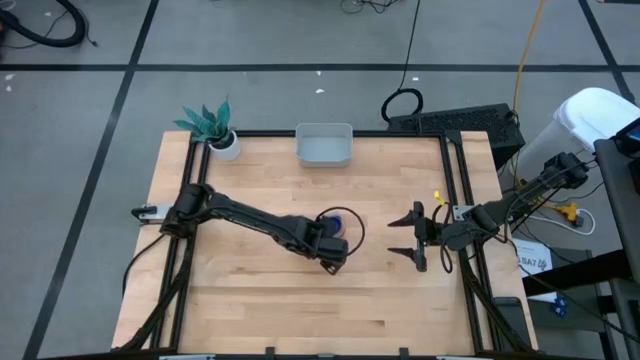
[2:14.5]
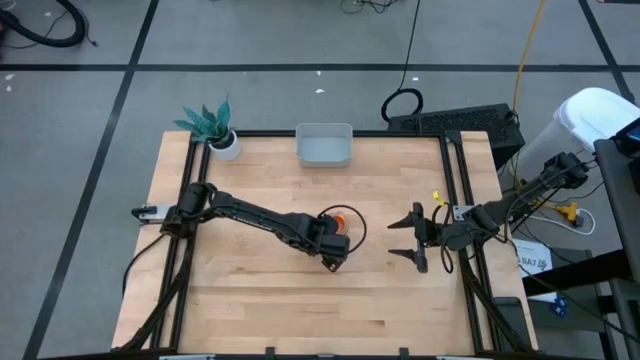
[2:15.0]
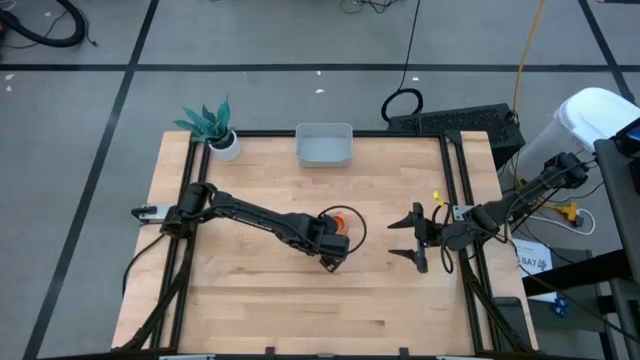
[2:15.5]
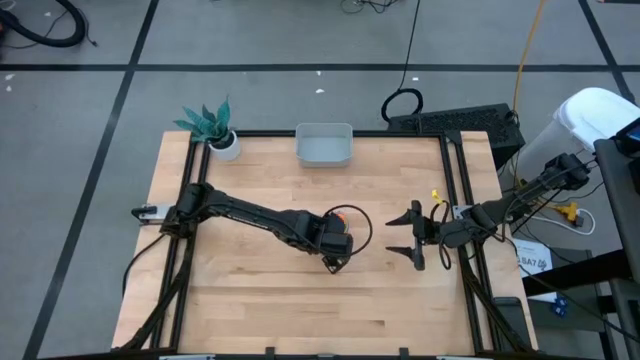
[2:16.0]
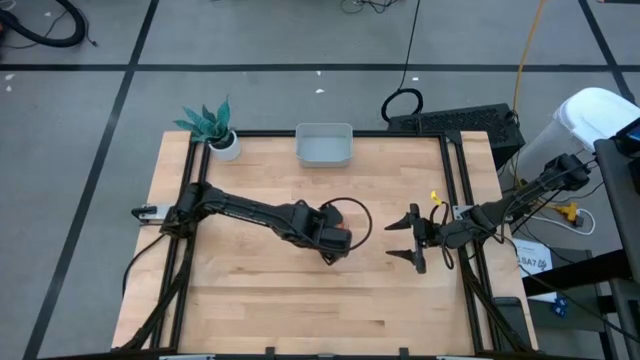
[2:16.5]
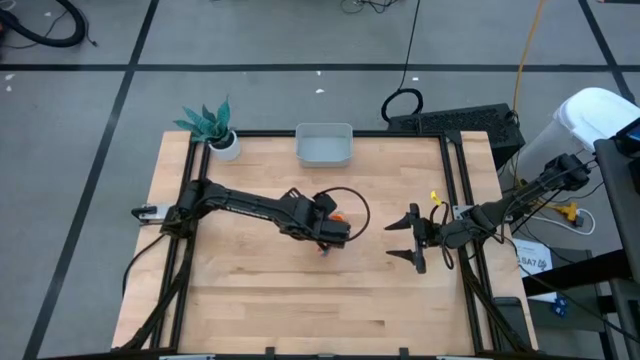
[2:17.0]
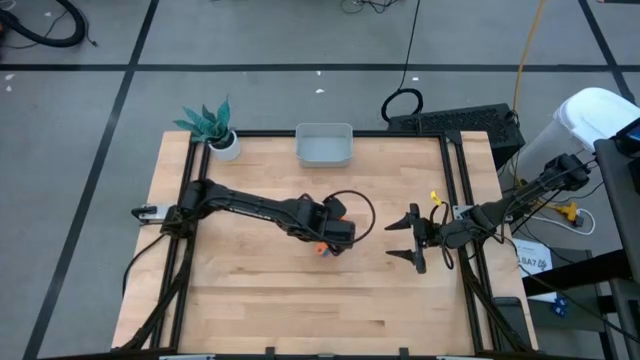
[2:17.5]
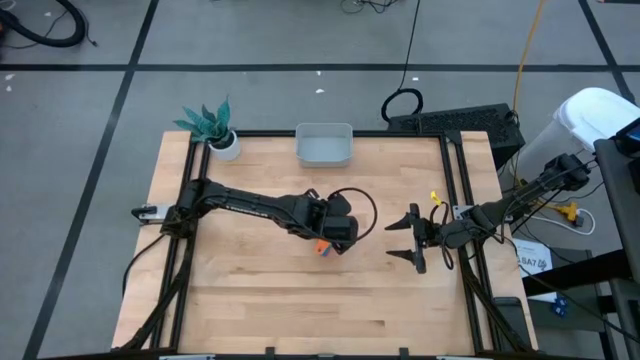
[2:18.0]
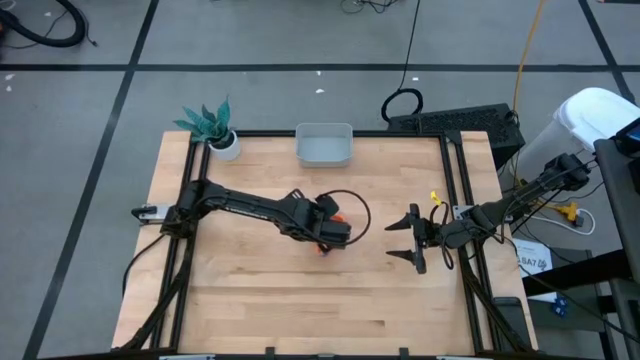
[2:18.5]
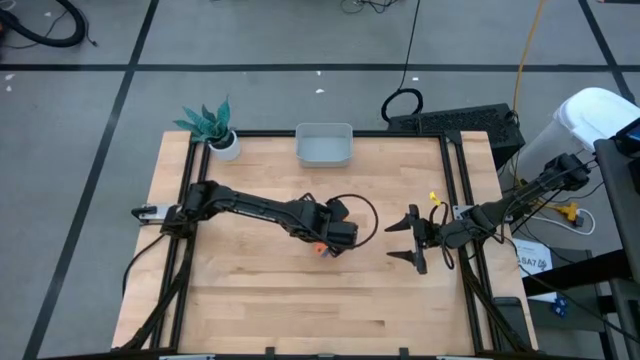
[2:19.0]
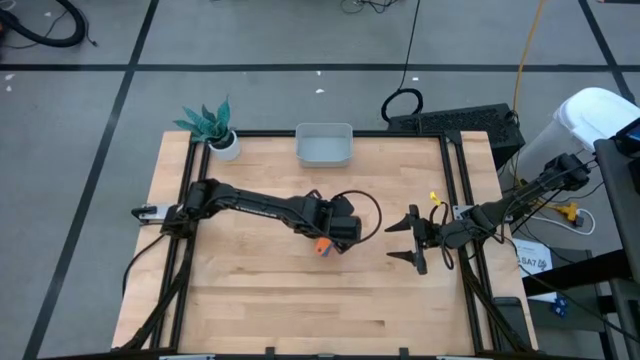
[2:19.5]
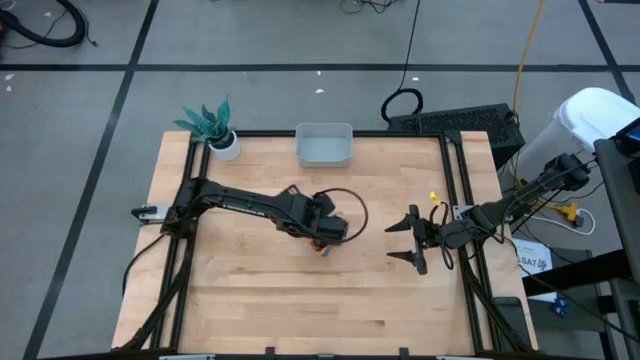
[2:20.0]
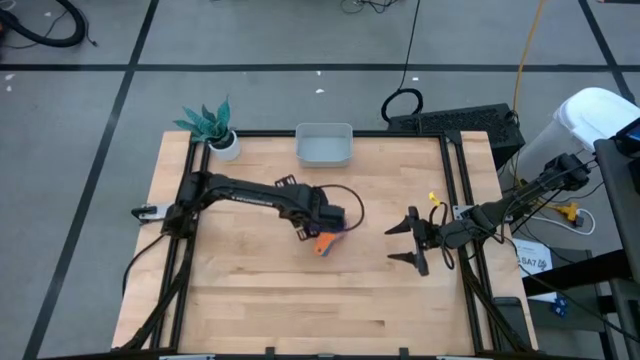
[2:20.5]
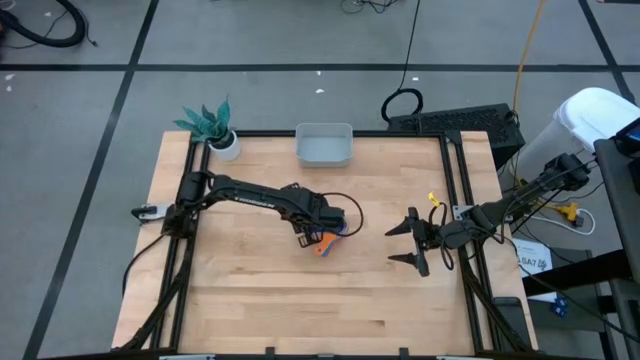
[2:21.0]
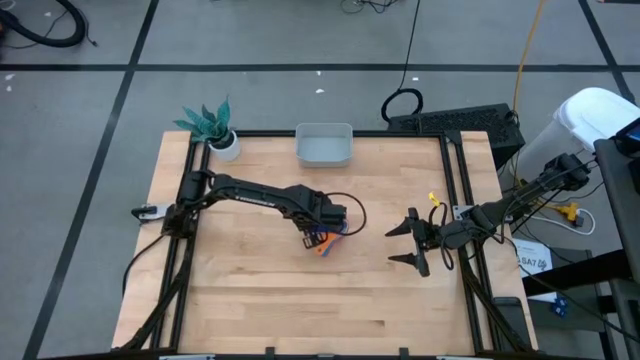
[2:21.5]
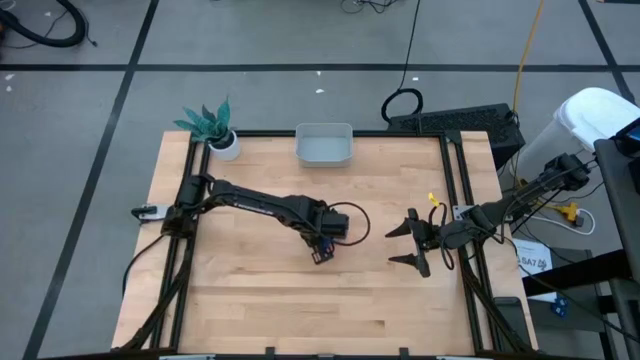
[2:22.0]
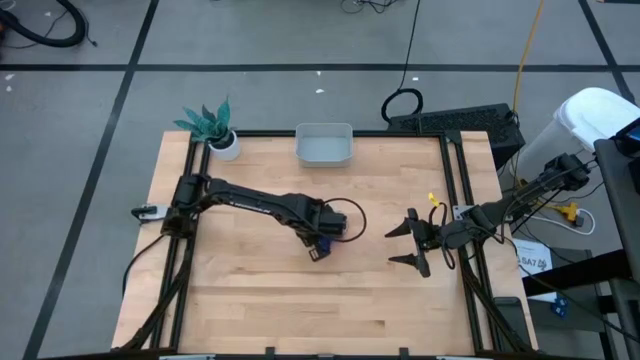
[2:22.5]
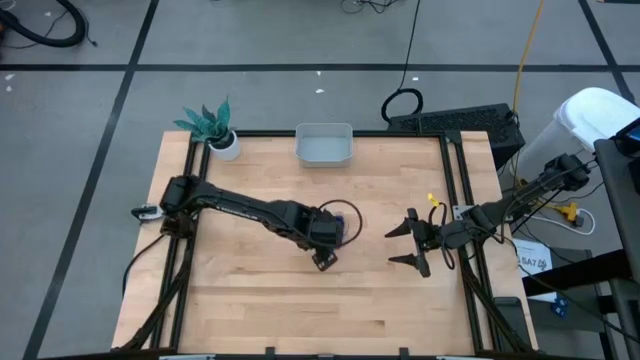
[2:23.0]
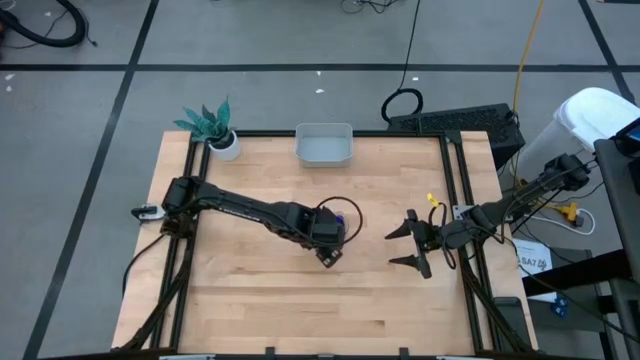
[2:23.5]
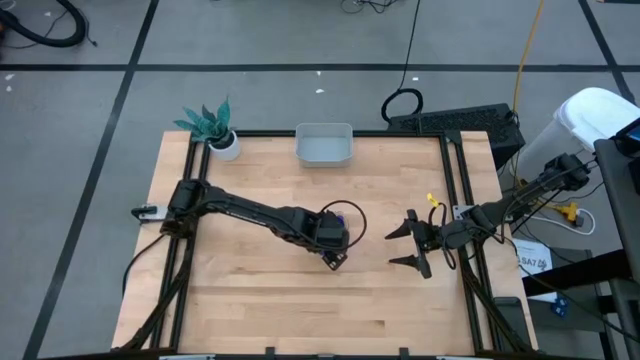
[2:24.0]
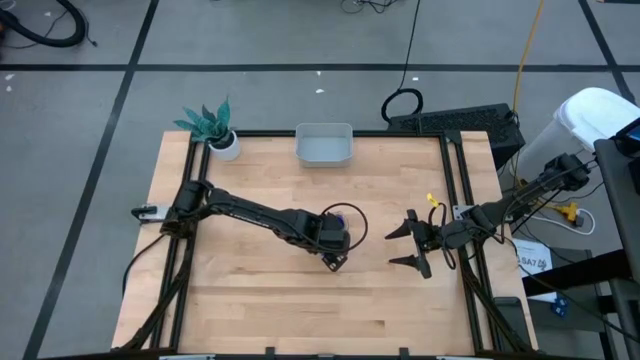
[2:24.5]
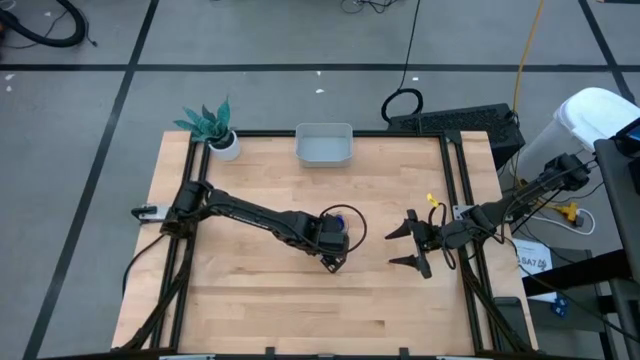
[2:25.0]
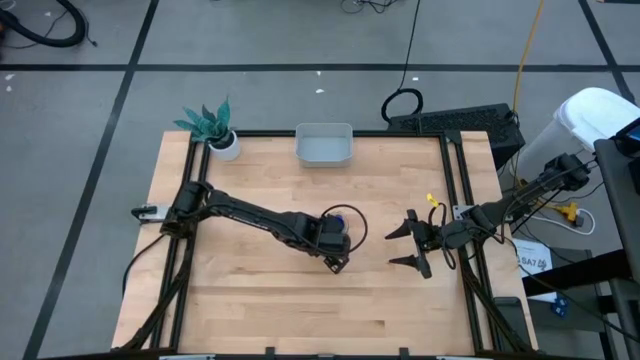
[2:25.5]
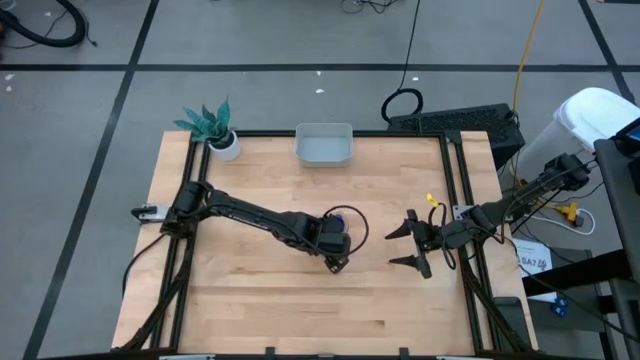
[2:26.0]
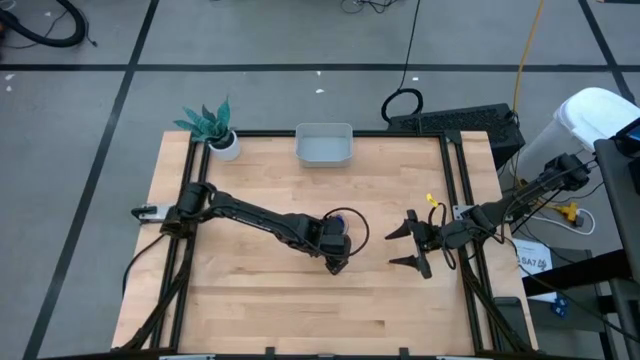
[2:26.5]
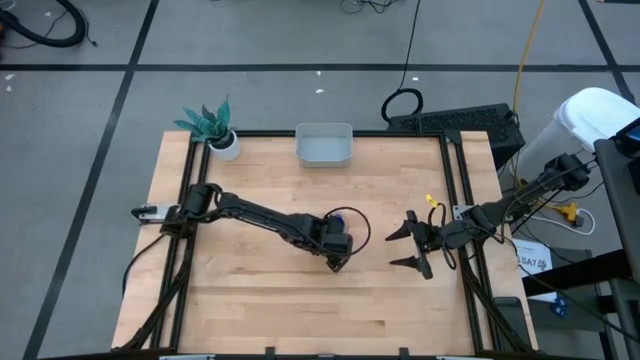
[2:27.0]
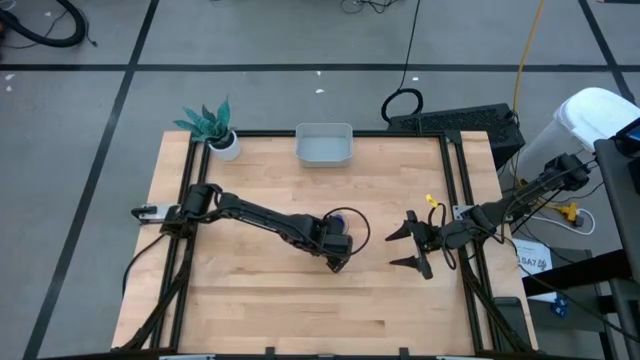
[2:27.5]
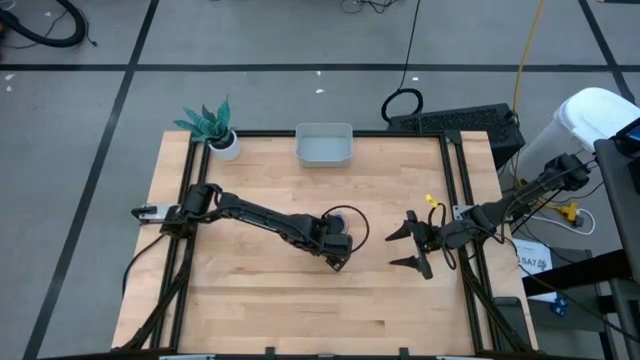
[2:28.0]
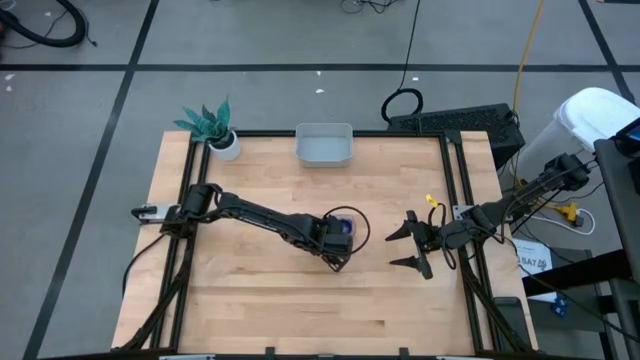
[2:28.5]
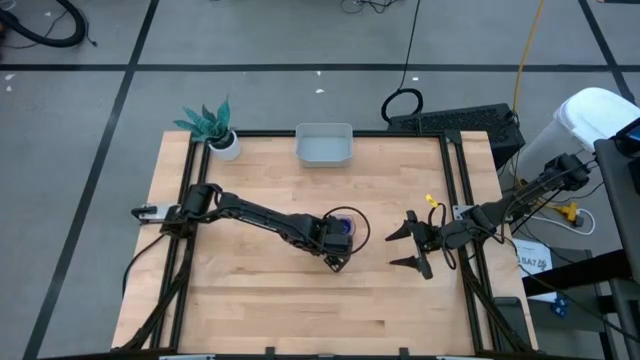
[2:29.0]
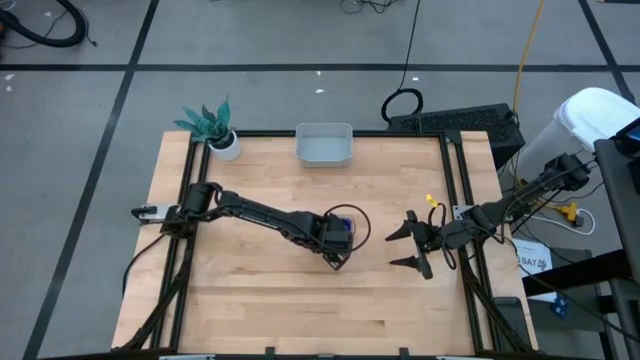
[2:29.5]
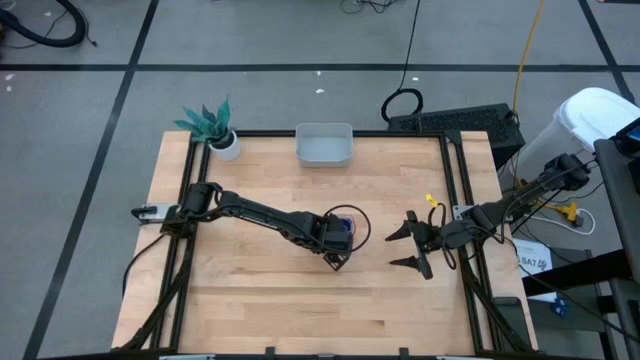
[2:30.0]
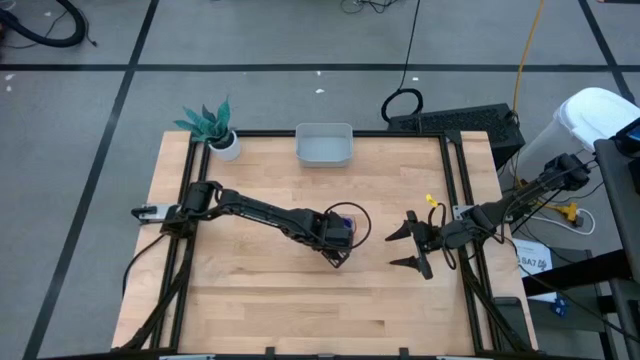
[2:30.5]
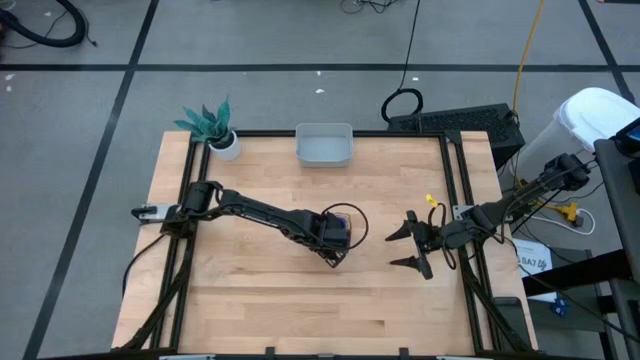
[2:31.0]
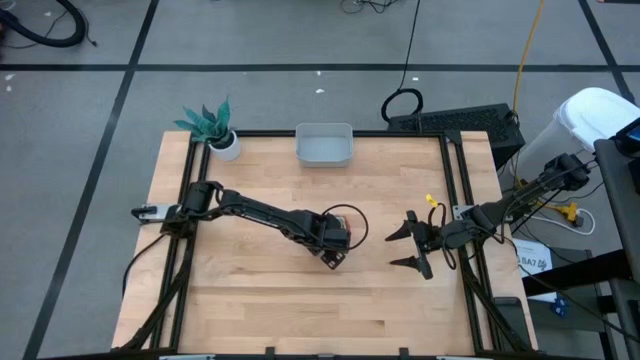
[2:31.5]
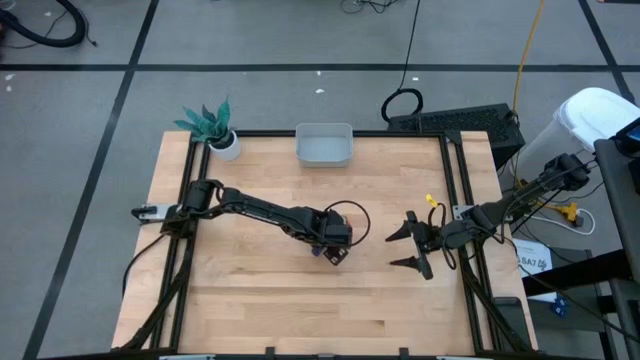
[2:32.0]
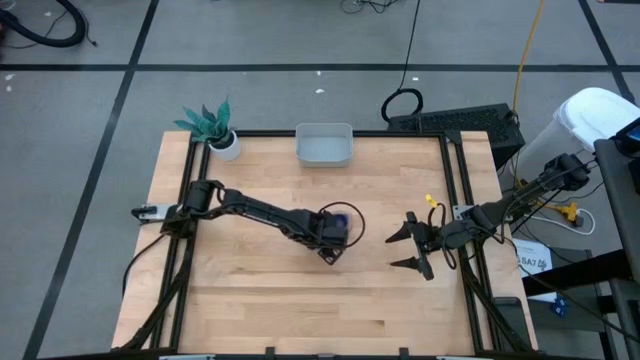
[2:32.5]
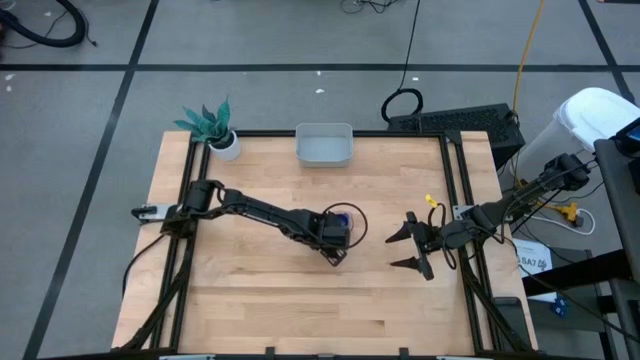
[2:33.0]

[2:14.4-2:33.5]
Task: Nest measuring cups in basket
Put the nested measuring cups into the gray bin

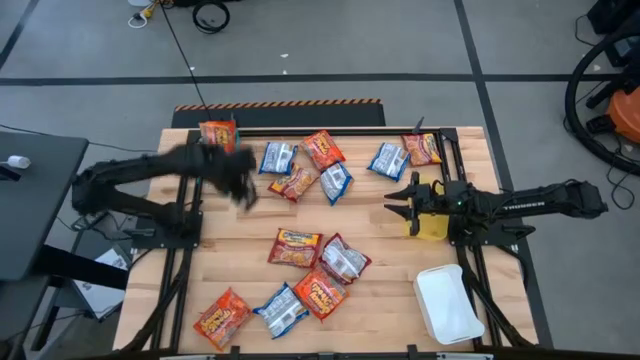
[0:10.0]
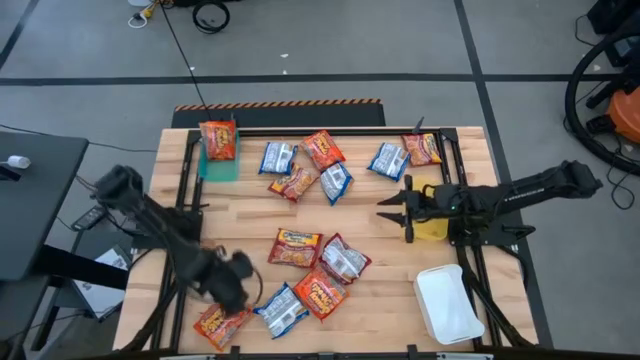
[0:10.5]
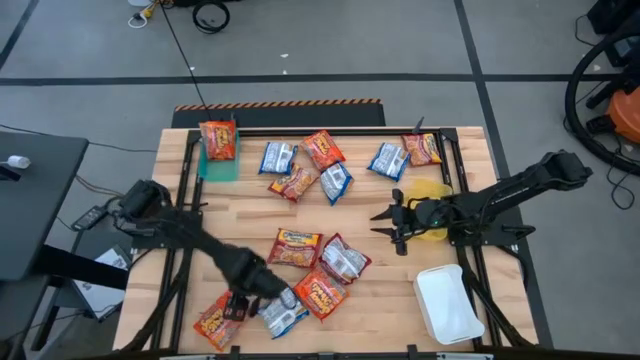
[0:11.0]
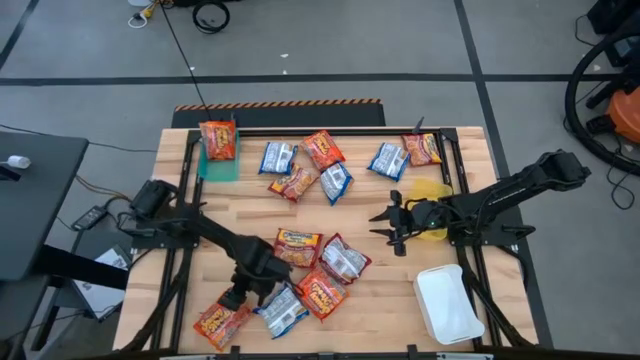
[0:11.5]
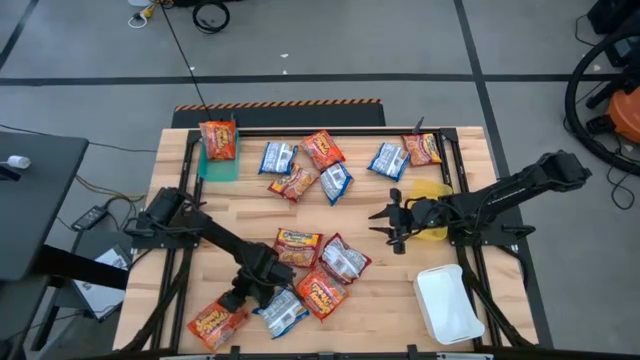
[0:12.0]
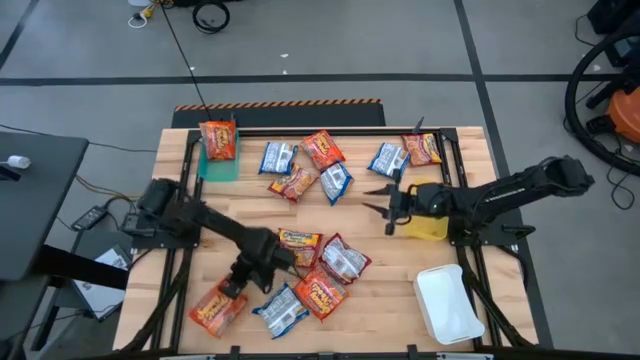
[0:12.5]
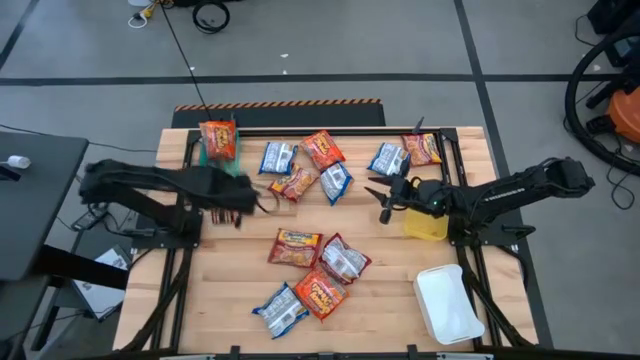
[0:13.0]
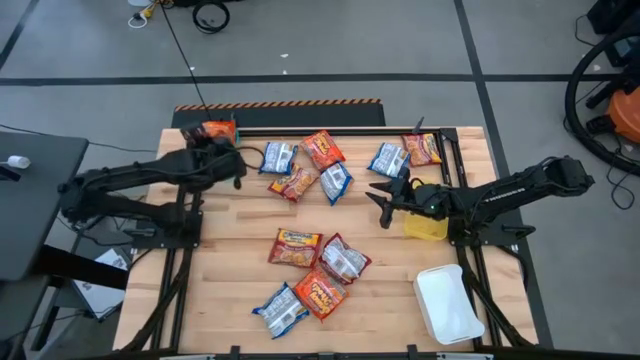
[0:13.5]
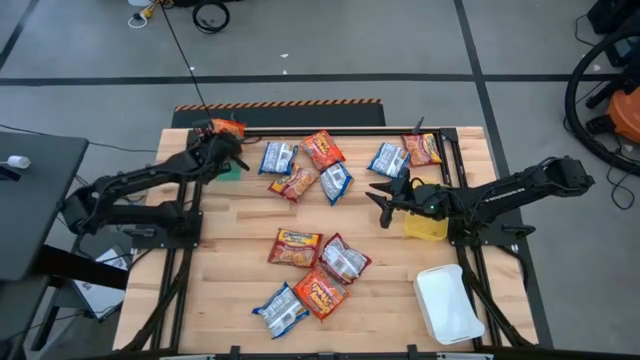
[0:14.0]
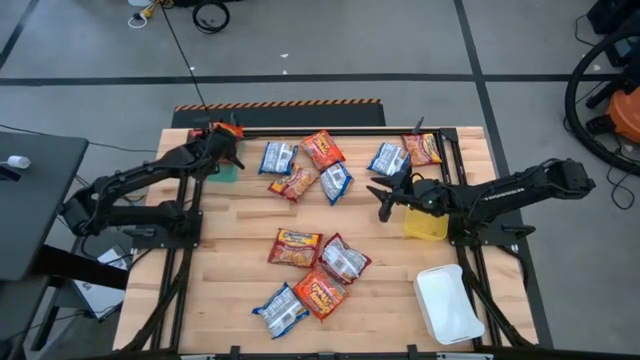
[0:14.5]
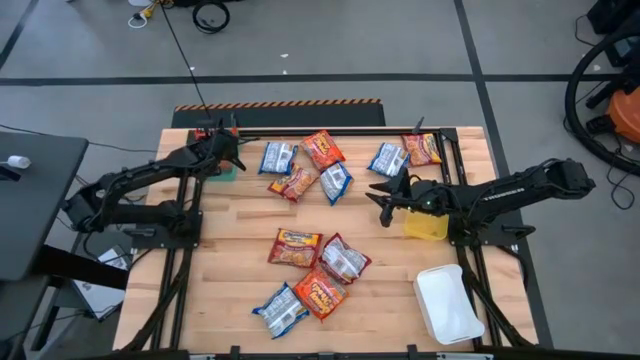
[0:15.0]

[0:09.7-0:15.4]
Task: Sort Maruchan noodles
Put the orange noodle pack into the green bin
